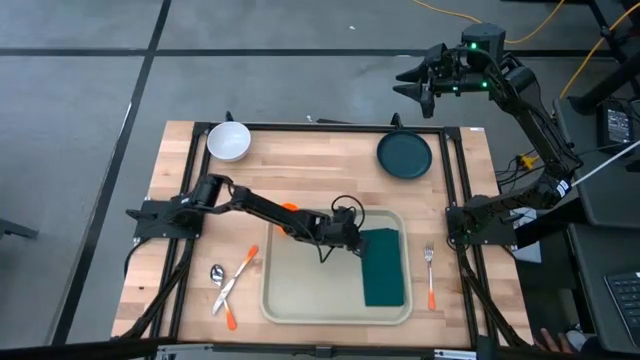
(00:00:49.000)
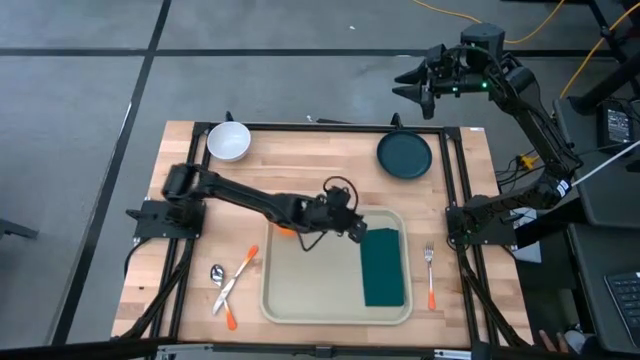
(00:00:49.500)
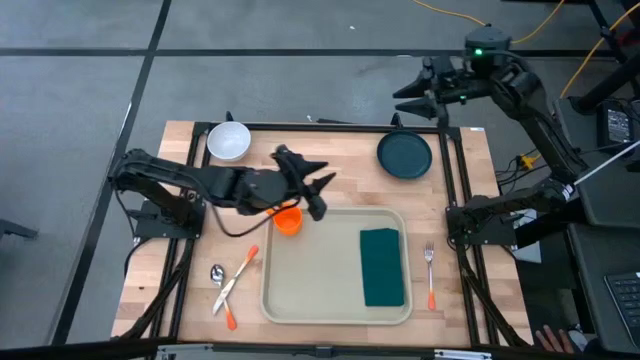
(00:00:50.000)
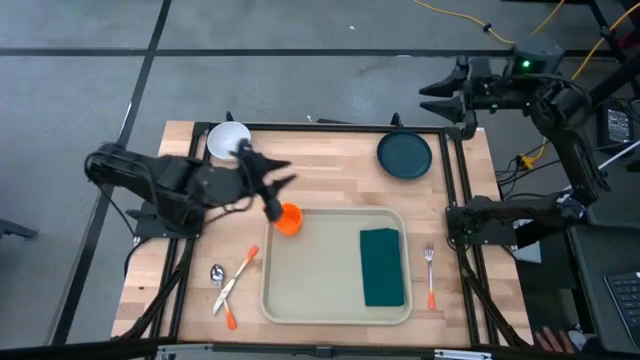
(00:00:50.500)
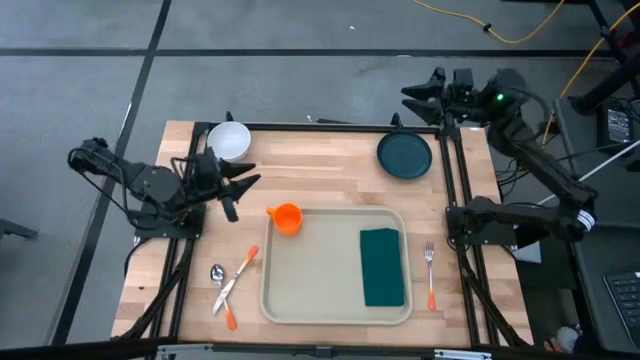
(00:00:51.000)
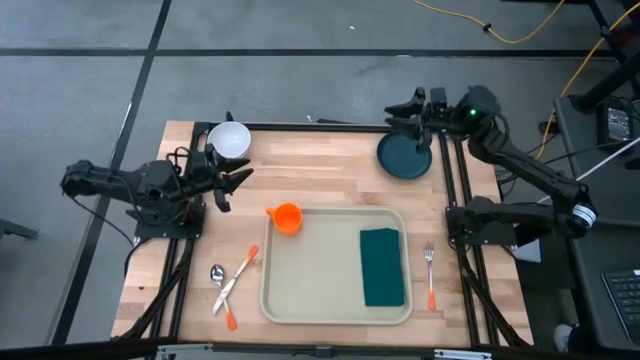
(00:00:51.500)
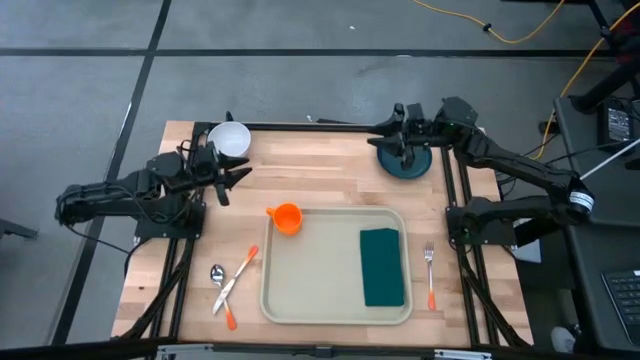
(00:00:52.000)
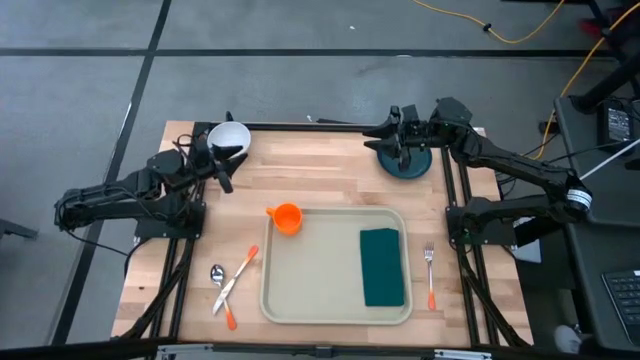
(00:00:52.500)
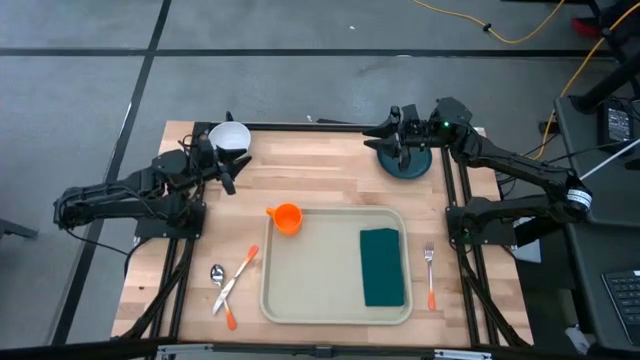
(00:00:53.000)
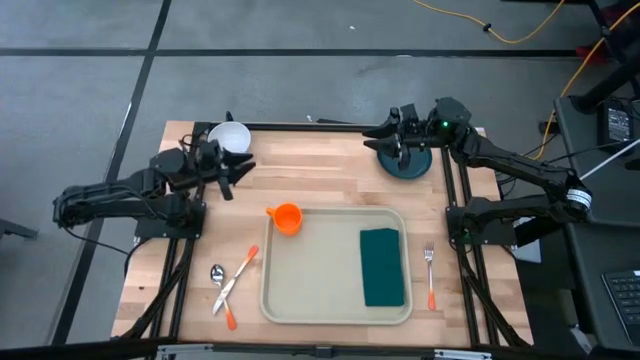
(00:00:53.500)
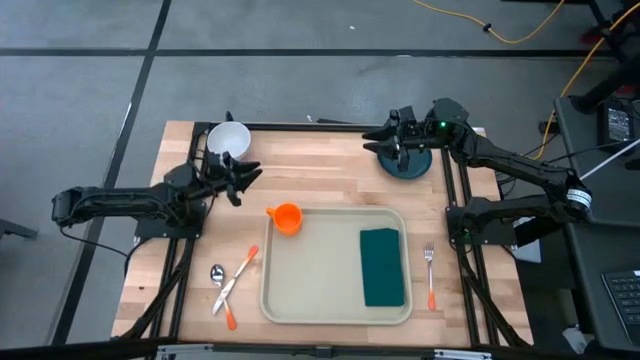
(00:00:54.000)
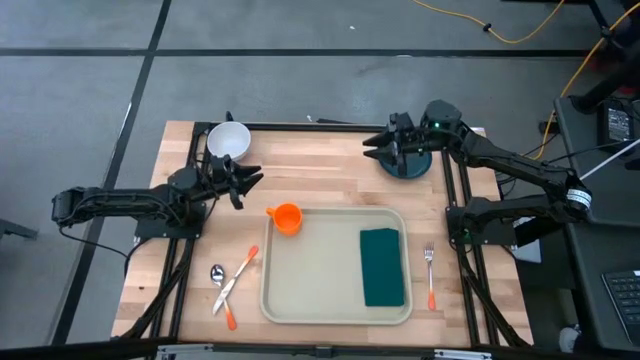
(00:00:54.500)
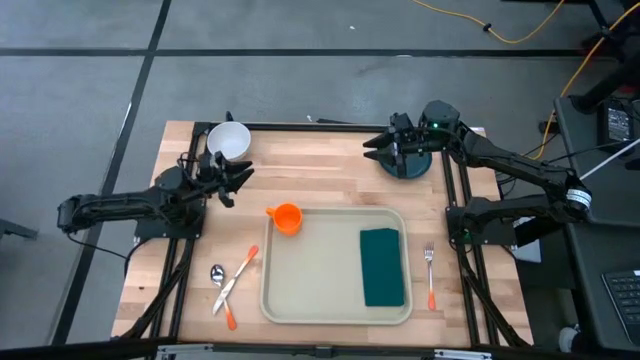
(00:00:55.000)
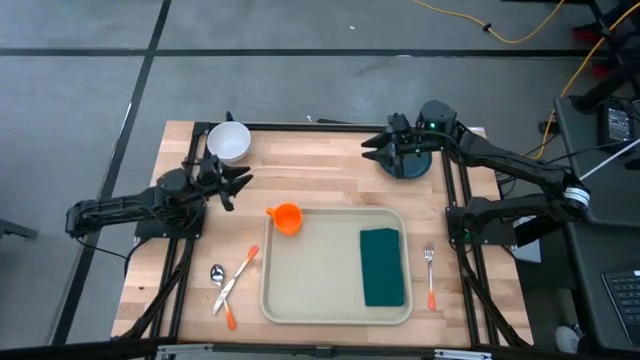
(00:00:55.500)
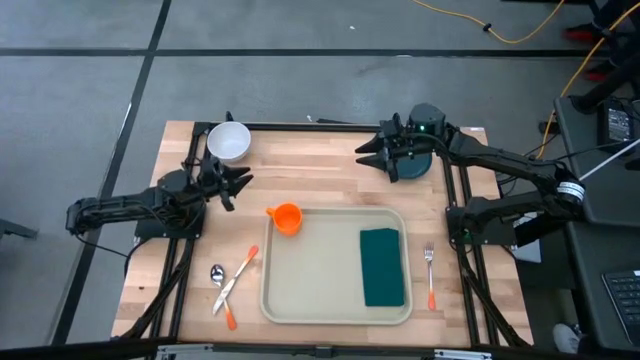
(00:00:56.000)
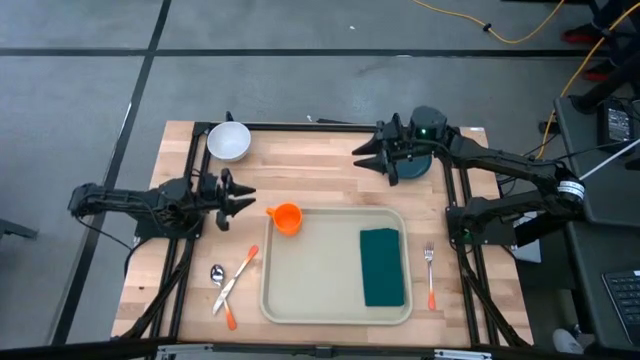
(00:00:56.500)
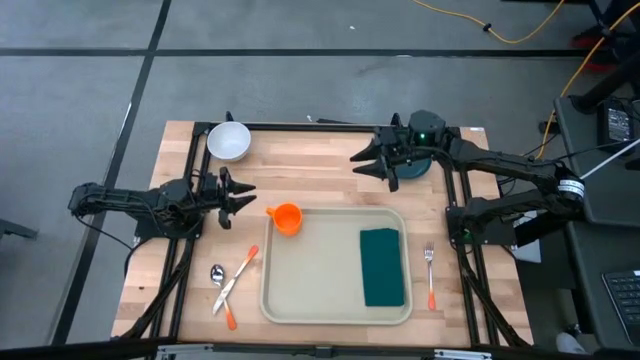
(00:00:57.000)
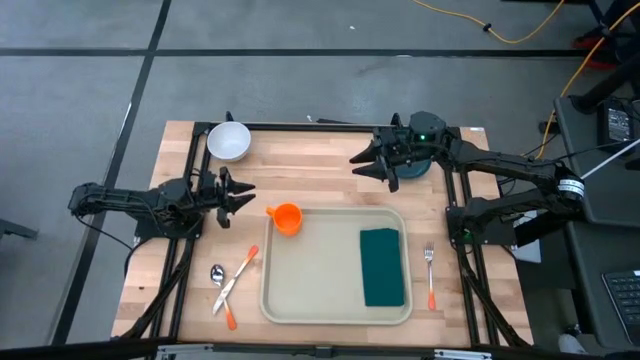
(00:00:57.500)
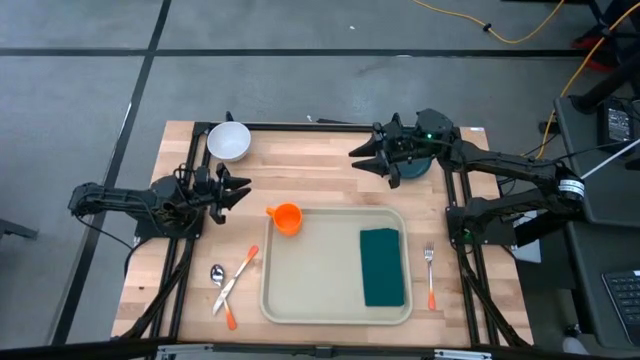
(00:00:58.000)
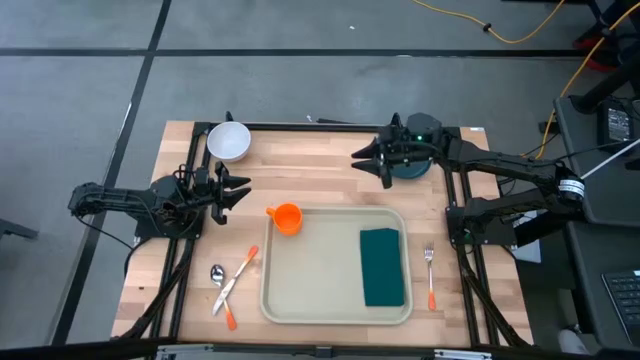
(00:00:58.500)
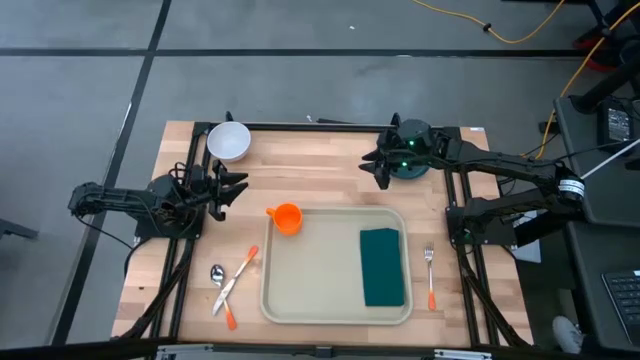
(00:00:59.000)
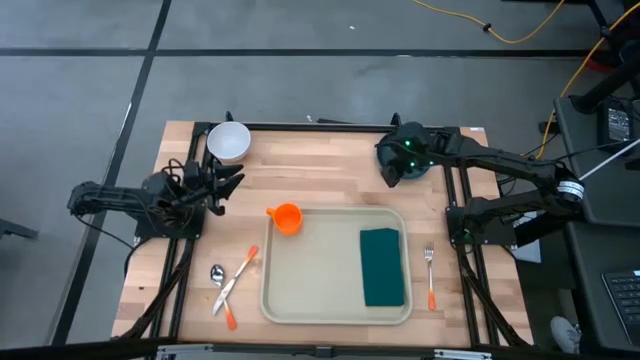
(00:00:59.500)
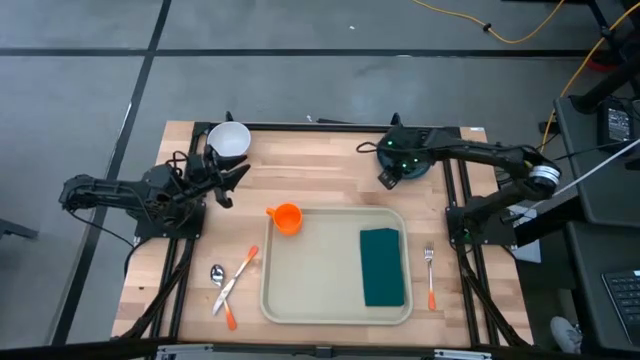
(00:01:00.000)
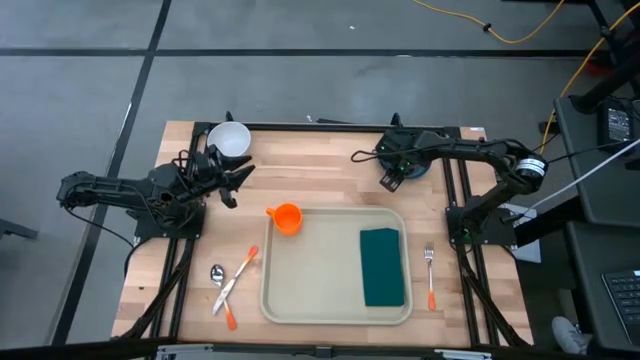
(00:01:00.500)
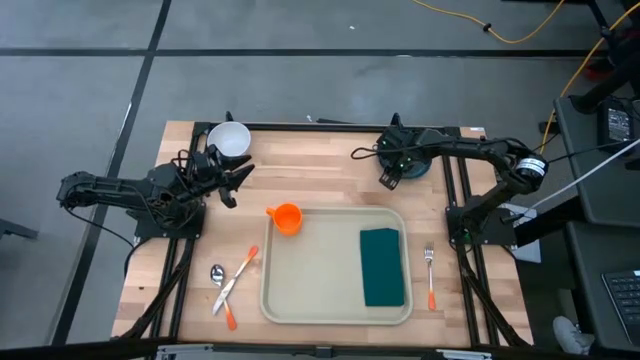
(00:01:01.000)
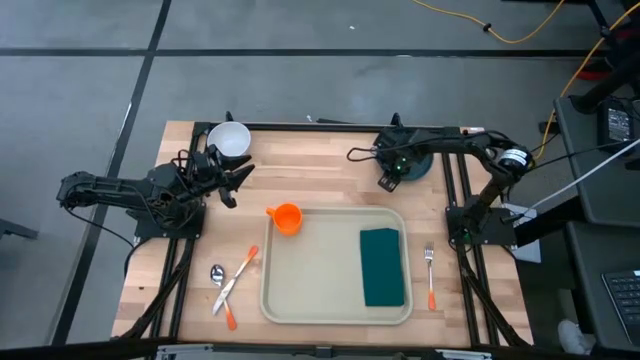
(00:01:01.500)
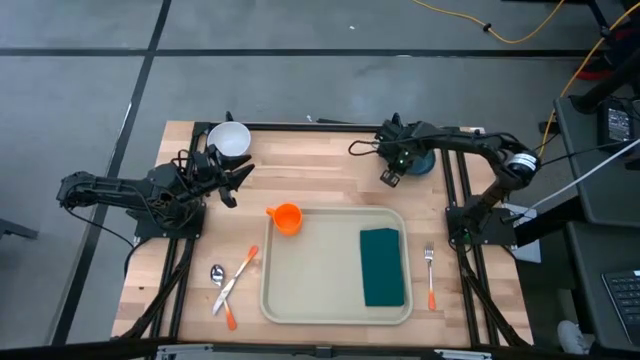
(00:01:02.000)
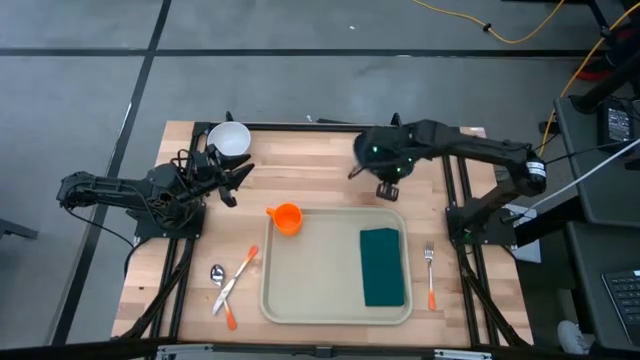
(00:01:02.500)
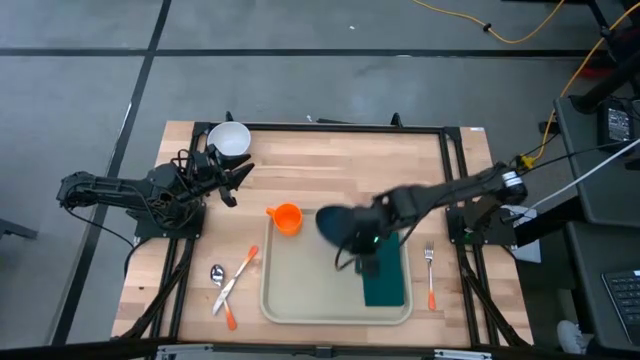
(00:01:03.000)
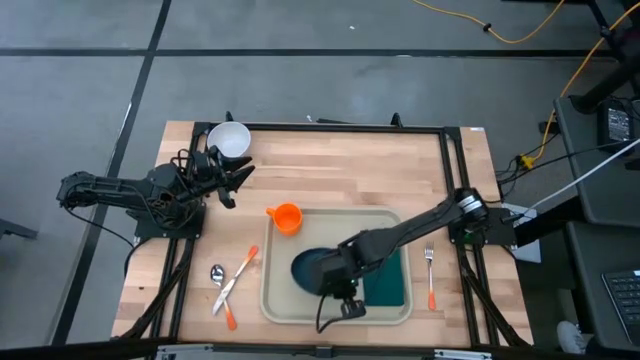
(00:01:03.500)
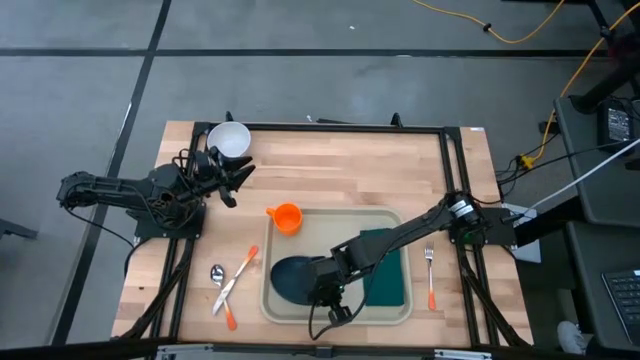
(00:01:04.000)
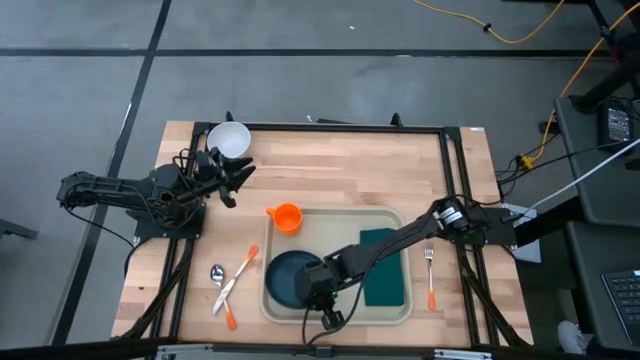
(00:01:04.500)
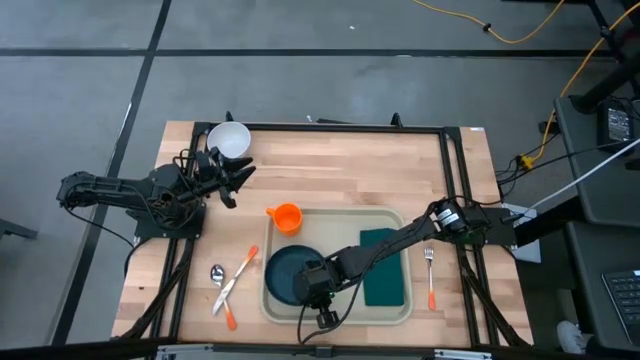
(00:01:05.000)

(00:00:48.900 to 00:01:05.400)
Task: Set up tray
Put the black plate on the serving tray to the left of the green napkin

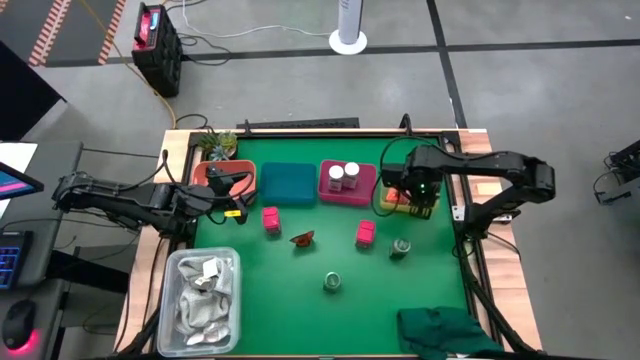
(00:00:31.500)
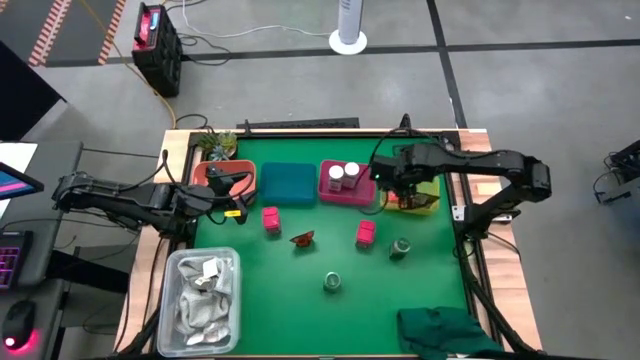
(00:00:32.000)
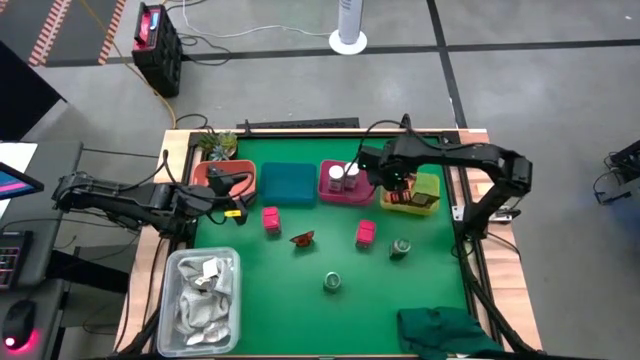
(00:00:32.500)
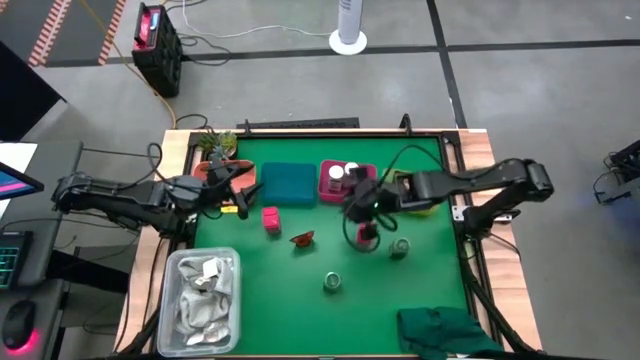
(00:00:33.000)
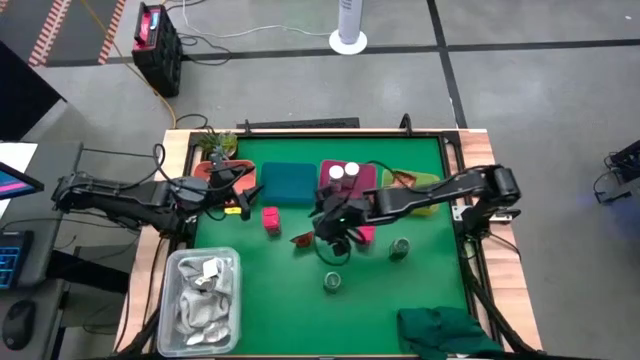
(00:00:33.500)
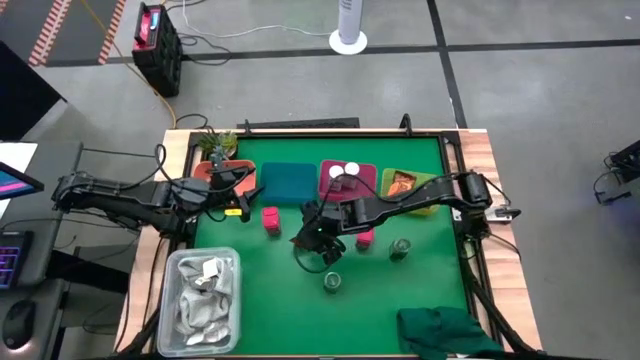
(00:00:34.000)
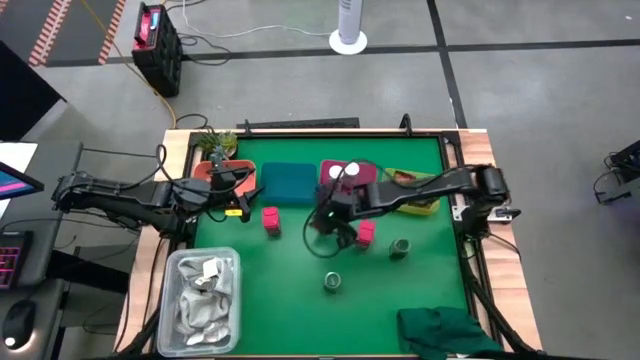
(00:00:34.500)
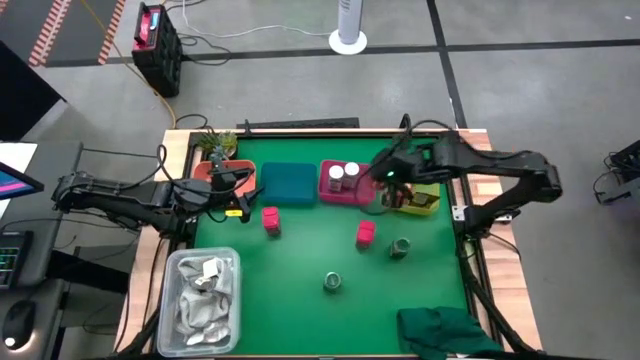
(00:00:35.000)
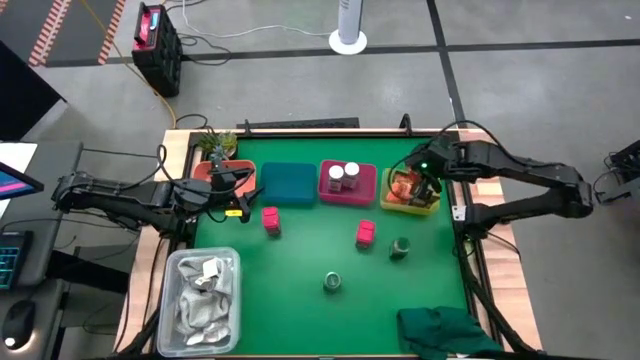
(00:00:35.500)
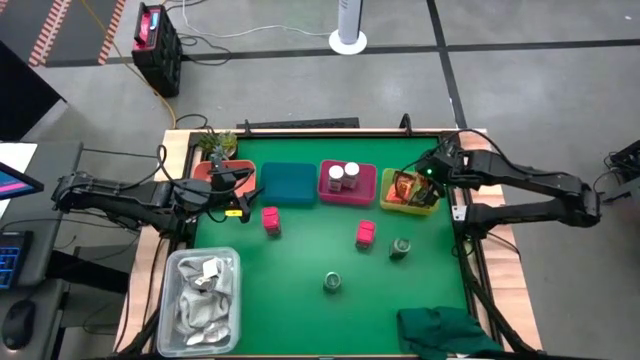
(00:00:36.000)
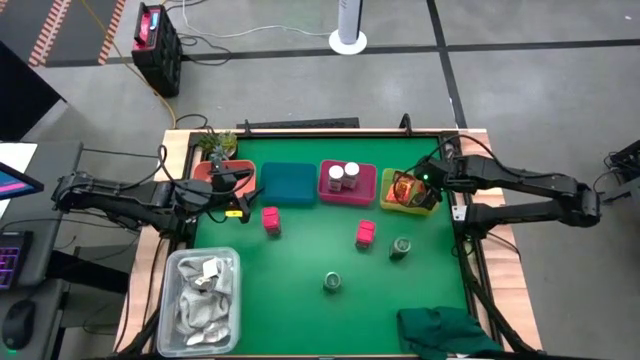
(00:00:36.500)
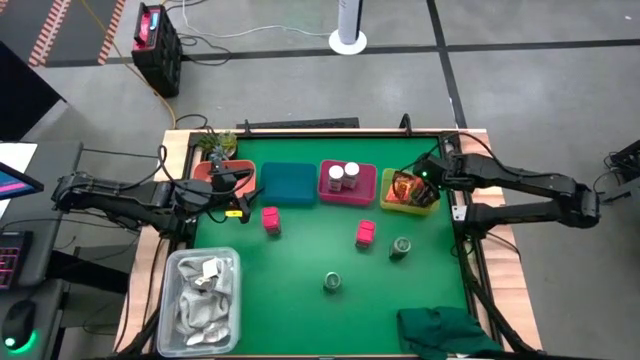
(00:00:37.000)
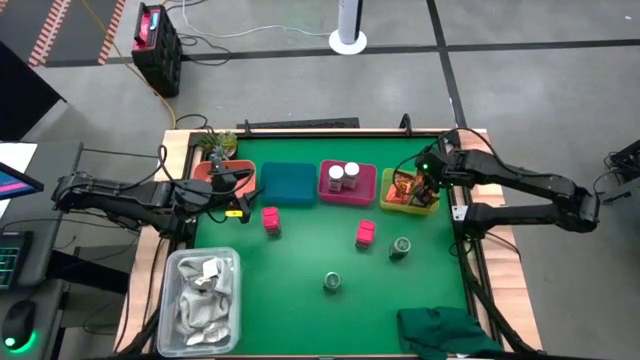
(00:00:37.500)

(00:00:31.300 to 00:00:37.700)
Task: Sort spices by type
Put the orange seasoning bag into the yellow bin
